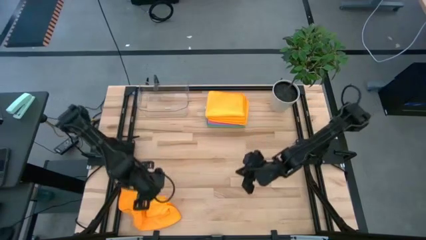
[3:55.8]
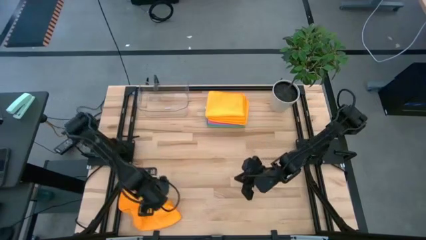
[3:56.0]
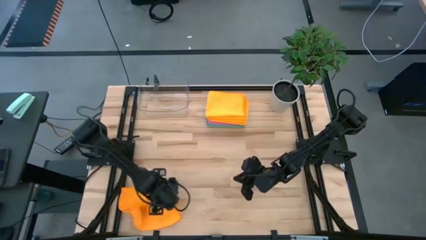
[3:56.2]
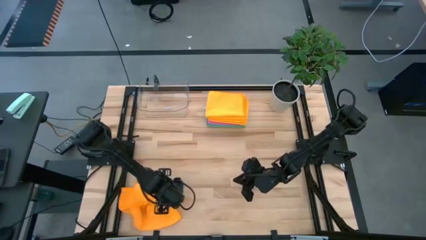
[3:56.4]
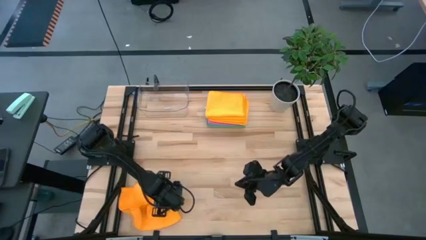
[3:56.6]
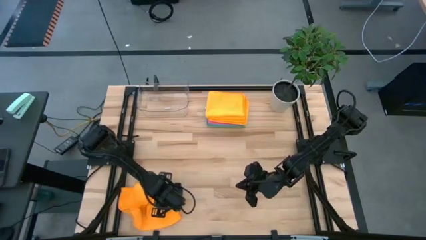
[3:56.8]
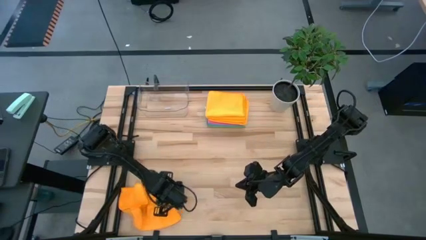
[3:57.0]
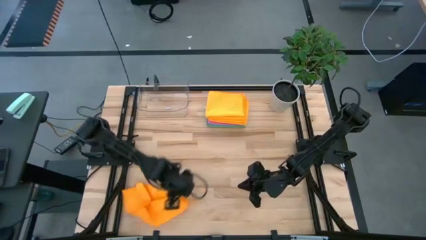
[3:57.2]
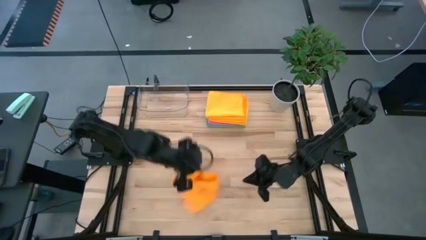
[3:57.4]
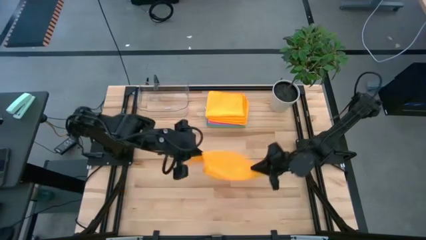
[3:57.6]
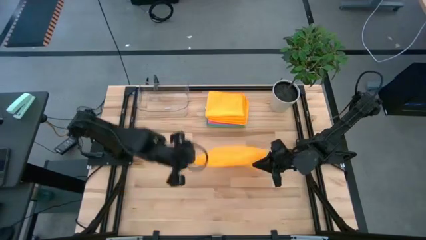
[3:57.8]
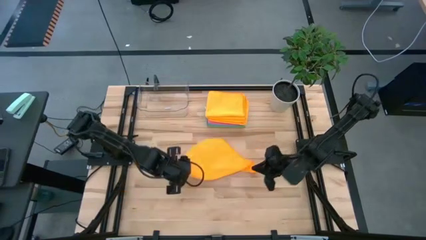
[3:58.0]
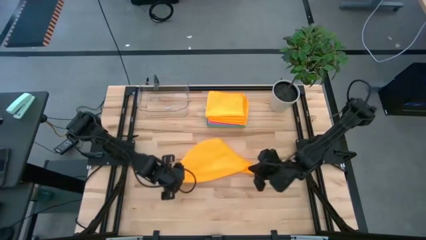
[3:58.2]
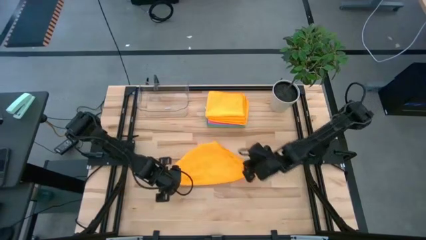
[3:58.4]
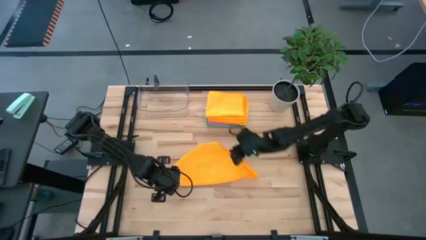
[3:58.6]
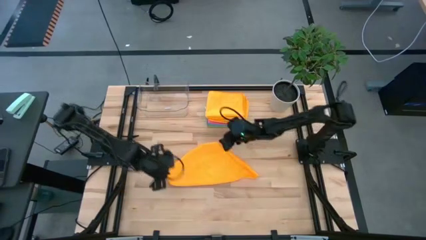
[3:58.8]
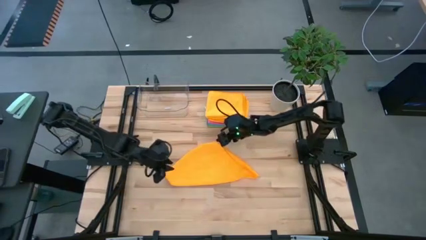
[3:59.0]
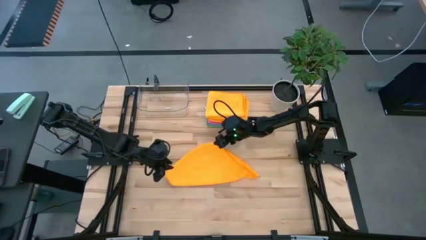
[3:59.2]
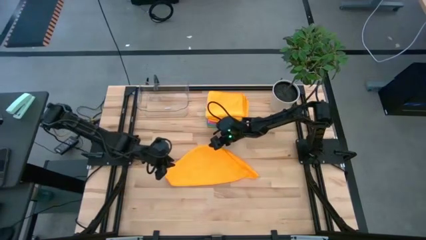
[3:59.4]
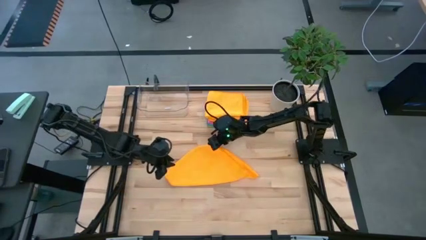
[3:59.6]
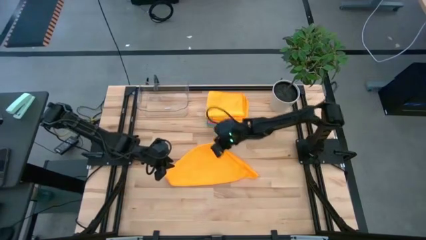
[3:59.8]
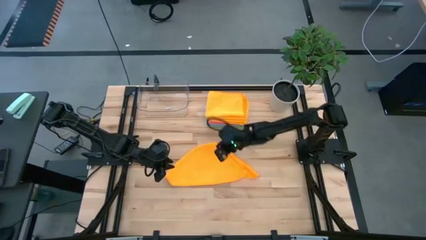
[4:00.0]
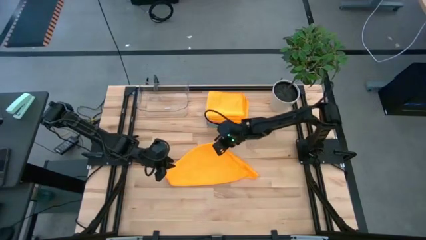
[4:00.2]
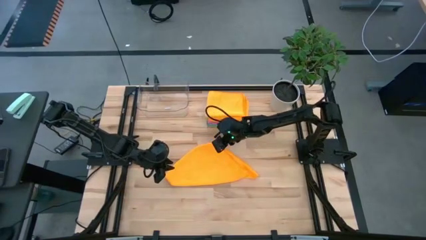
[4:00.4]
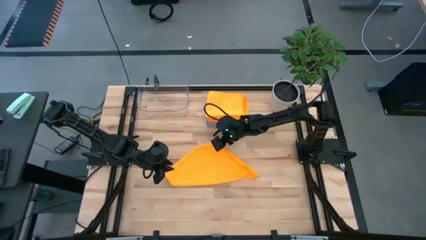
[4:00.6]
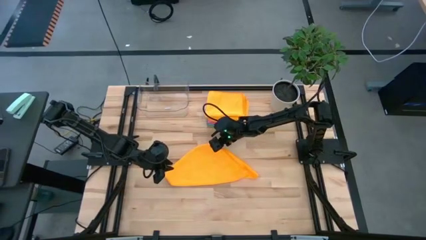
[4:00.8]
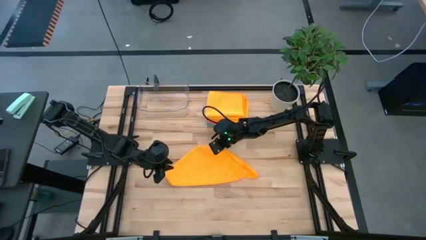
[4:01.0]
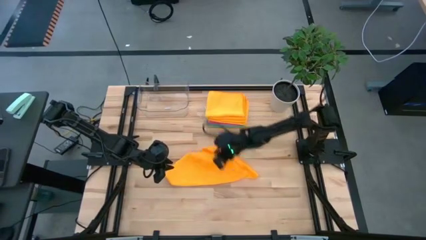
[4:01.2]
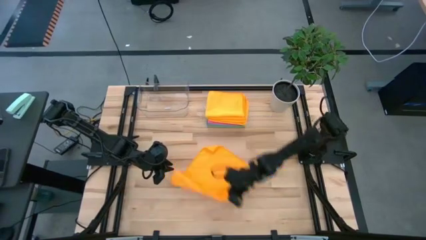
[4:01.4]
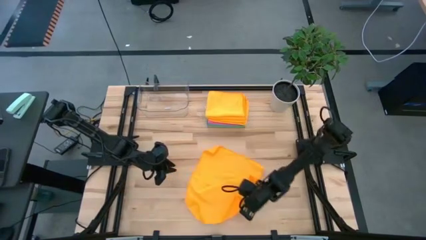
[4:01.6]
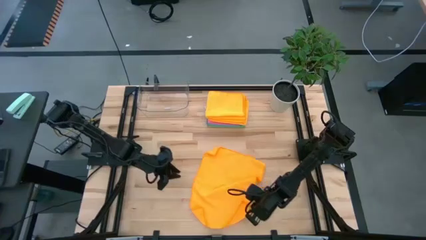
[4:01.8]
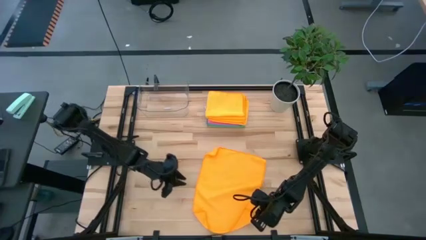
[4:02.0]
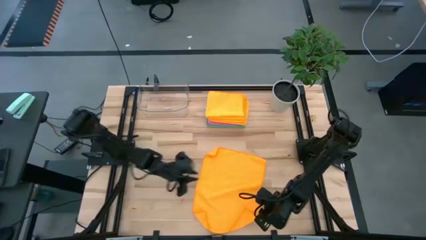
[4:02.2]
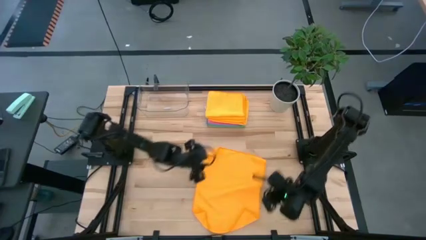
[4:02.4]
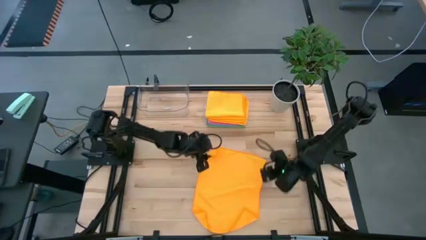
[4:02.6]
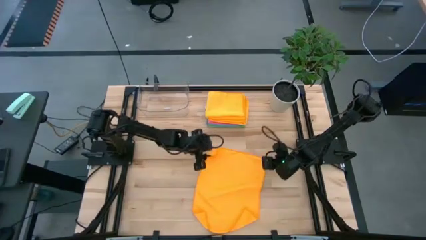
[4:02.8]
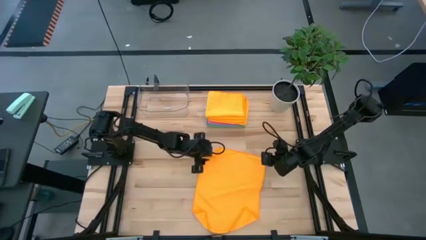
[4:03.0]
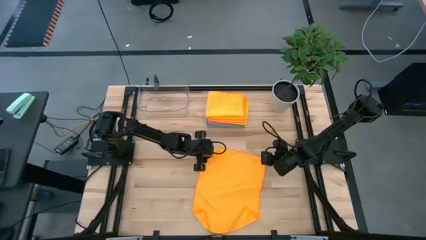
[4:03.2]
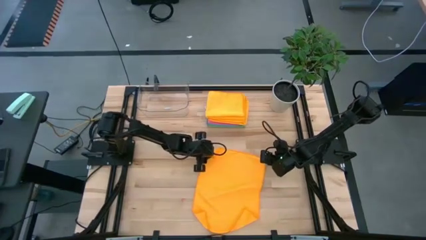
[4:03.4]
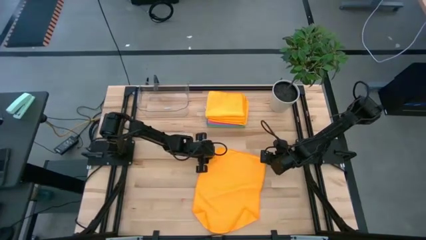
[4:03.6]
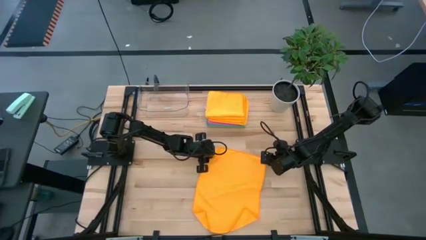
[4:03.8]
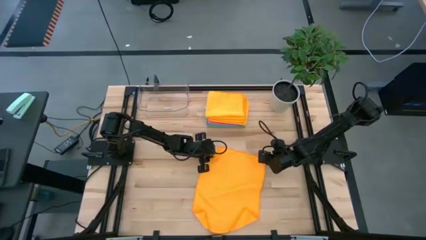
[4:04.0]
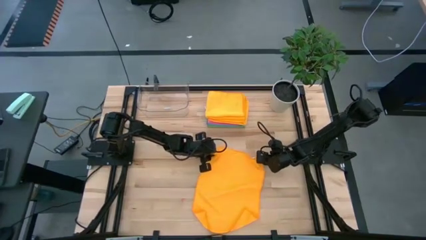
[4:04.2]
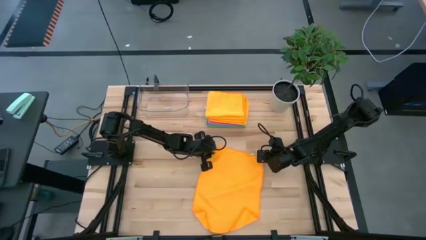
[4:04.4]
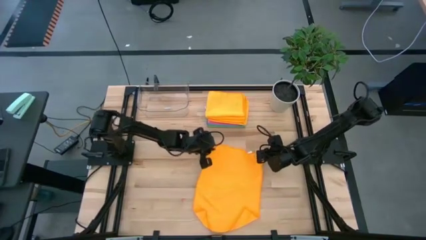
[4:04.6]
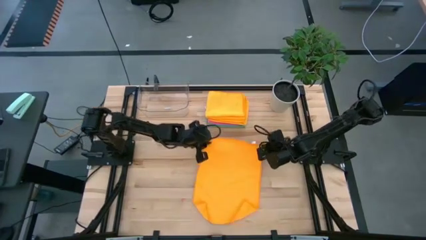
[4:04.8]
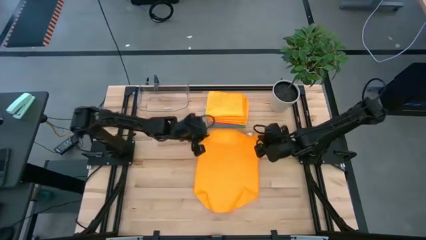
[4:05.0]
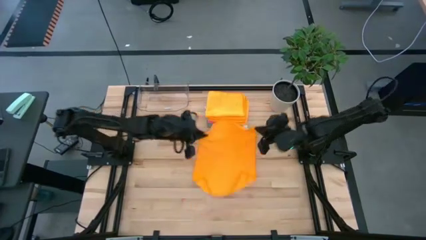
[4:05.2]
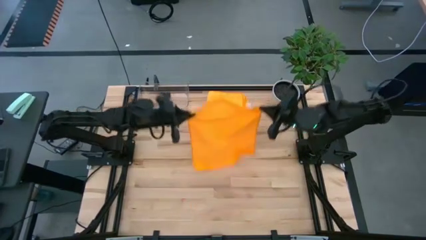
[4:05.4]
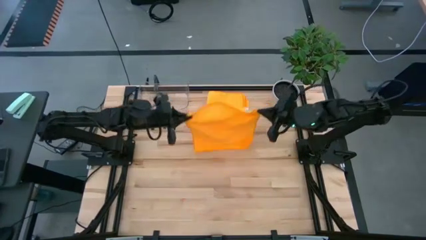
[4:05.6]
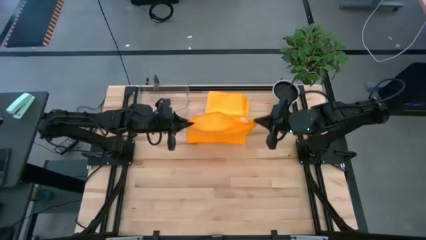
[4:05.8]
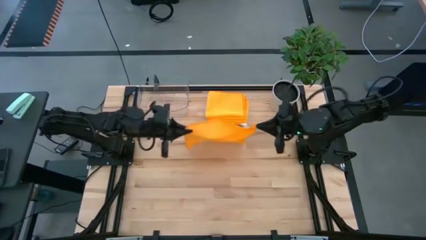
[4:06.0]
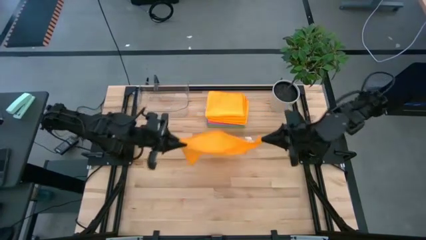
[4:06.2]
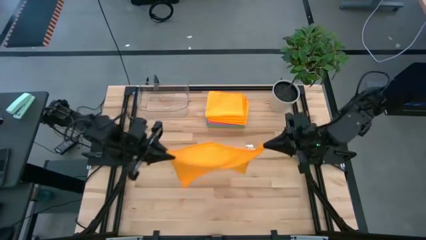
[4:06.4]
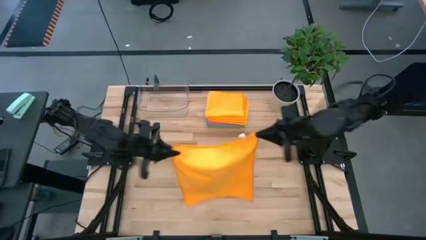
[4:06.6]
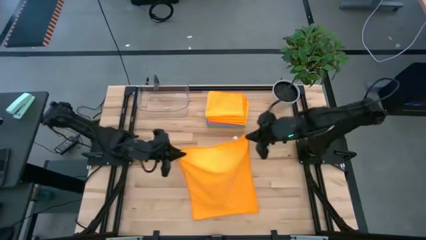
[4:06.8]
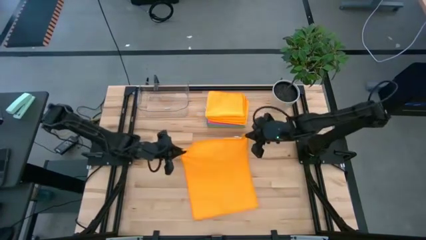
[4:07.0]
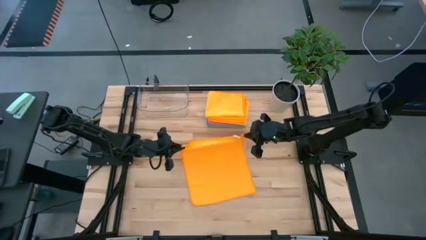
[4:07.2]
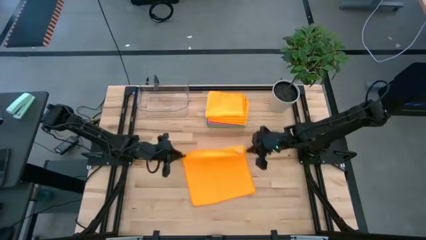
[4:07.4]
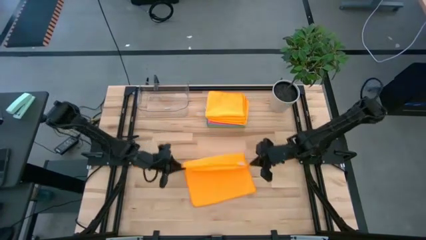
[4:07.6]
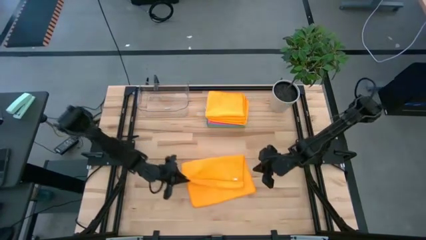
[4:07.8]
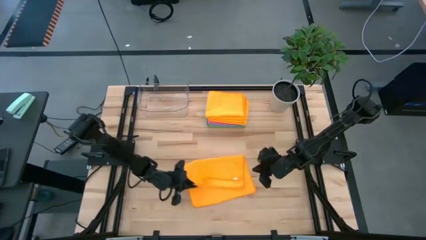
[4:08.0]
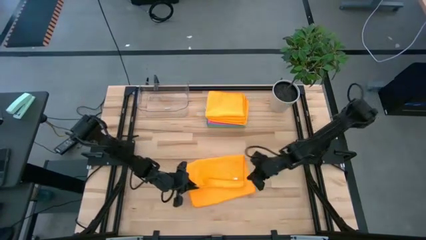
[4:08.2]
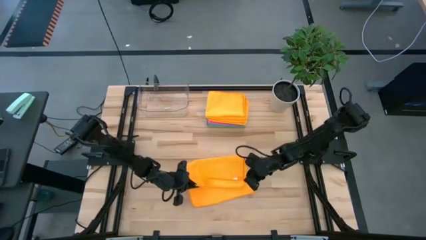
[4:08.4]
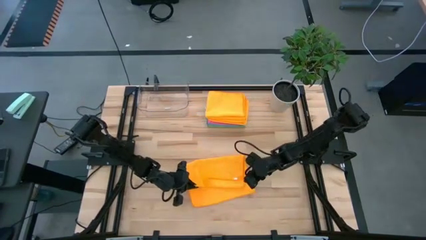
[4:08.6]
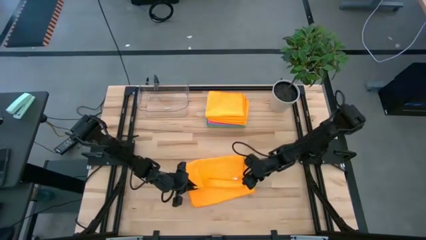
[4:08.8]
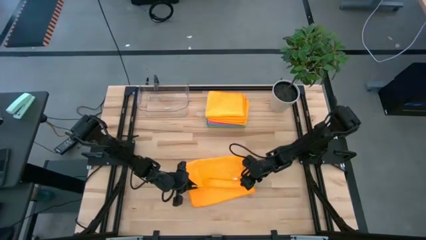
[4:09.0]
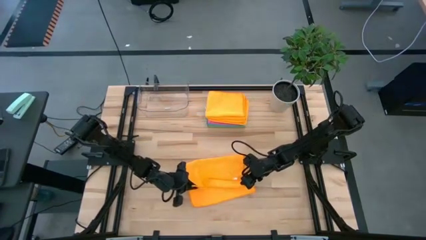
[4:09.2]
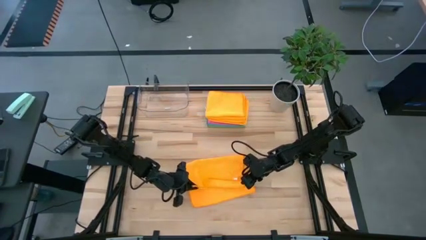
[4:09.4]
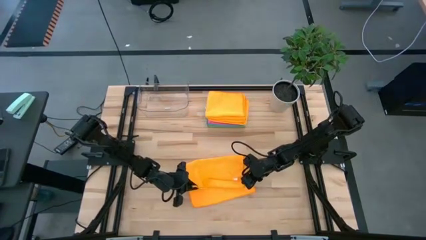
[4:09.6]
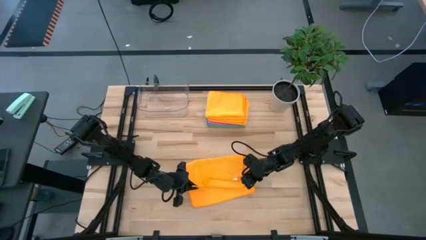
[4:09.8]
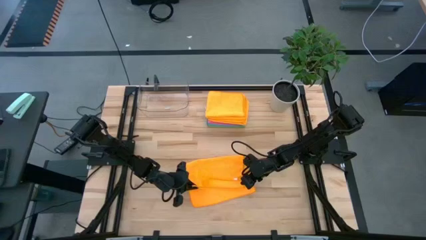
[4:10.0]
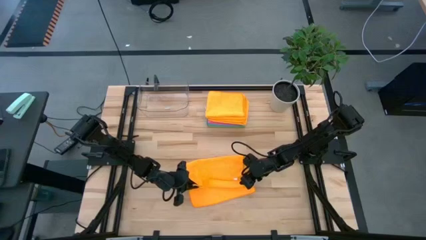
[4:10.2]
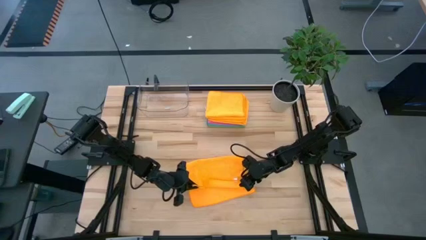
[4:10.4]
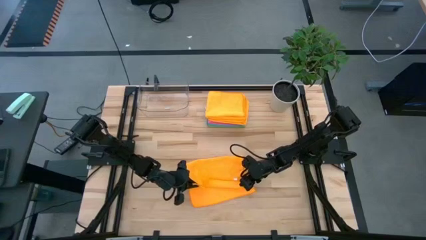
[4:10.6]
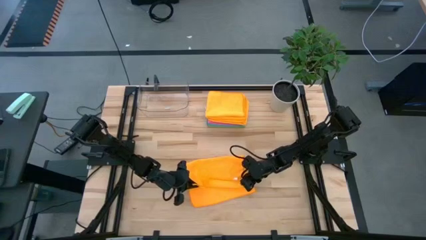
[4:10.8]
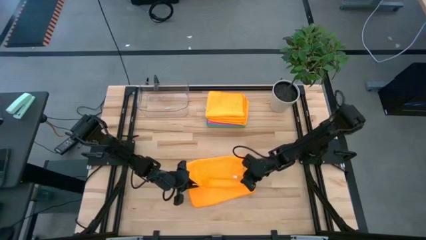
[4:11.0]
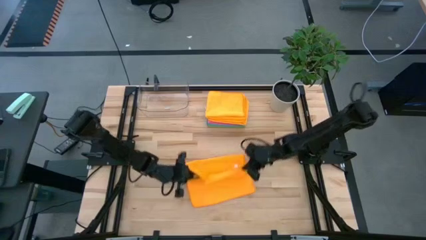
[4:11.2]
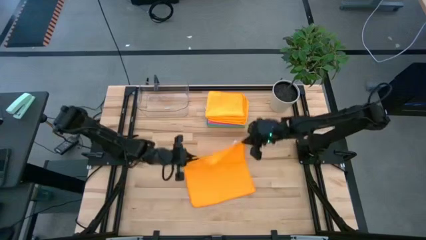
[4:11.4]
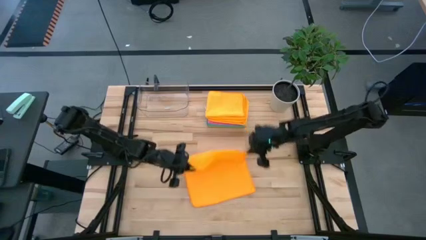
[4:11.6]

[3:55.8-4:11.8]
Task: Fold microfiber towels
Fold the orange towel
